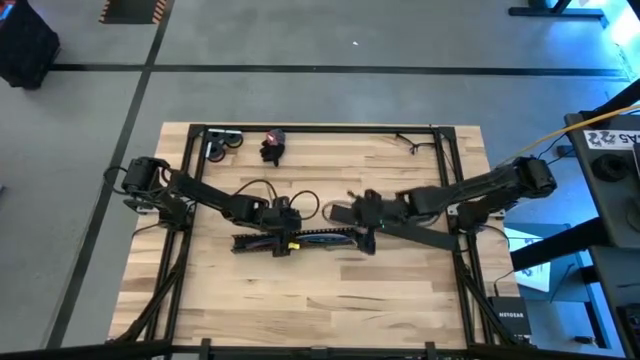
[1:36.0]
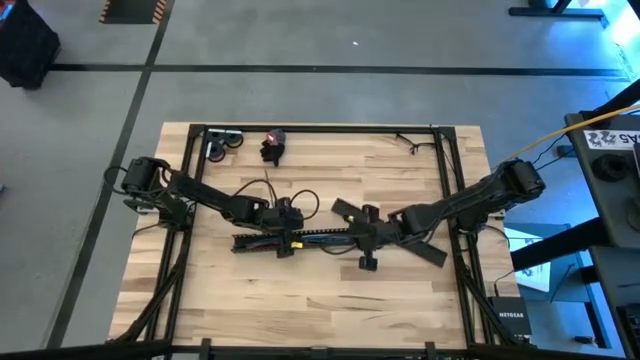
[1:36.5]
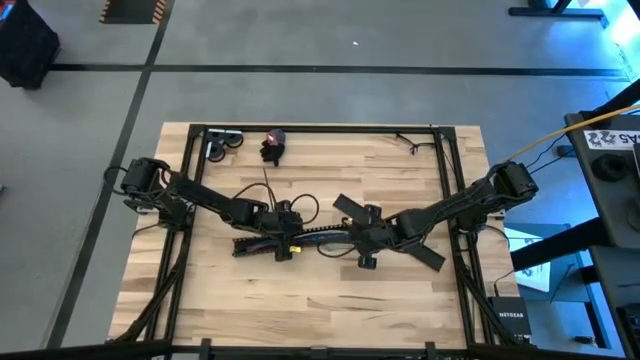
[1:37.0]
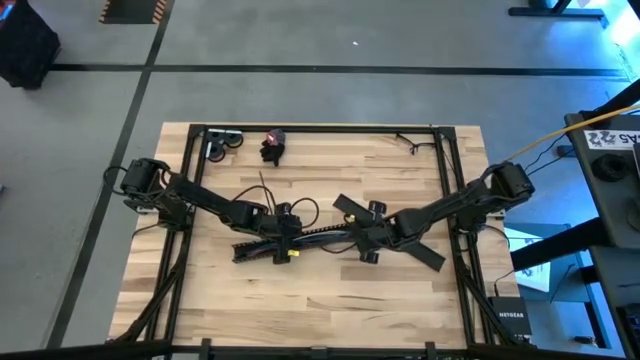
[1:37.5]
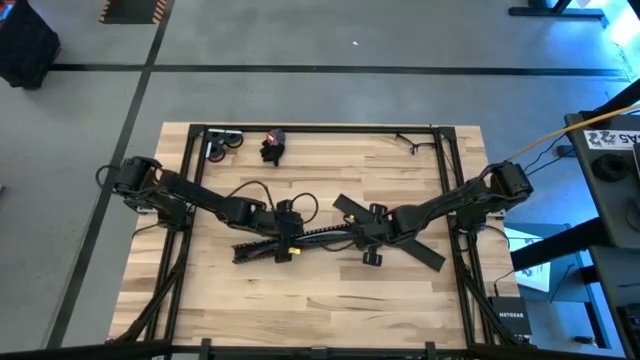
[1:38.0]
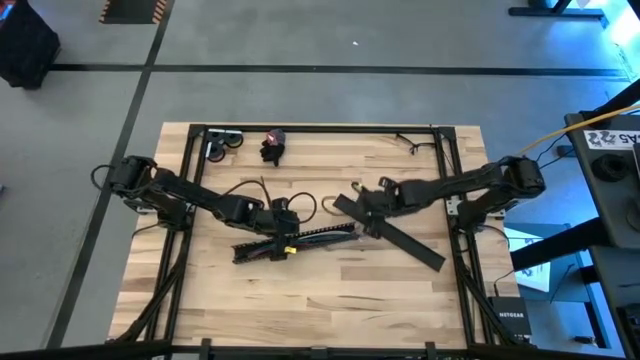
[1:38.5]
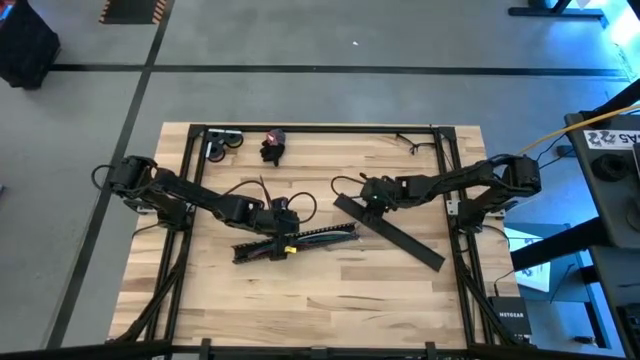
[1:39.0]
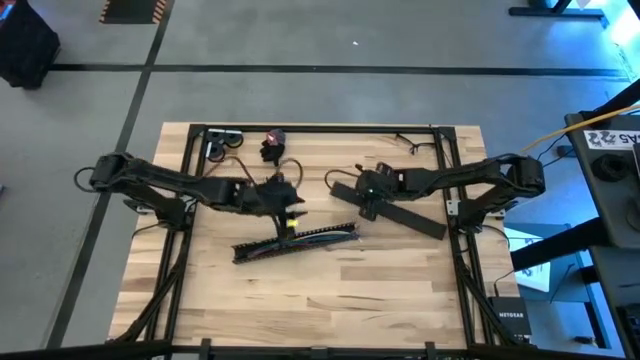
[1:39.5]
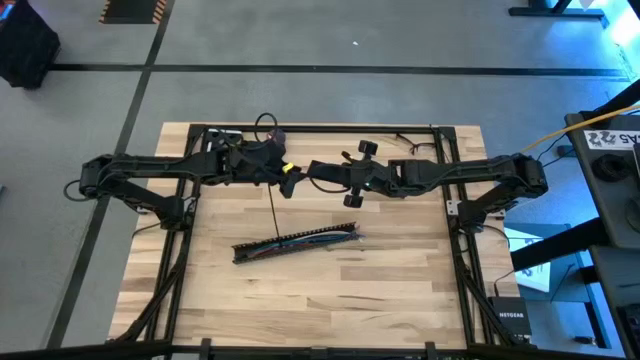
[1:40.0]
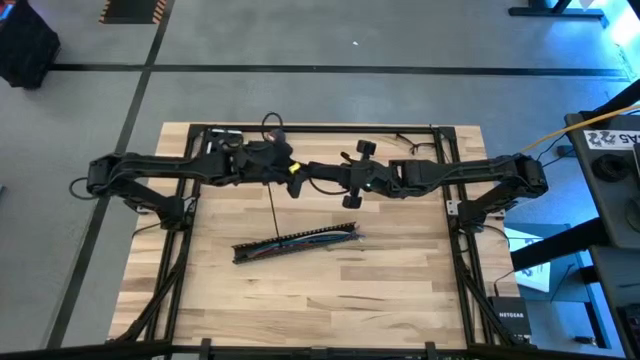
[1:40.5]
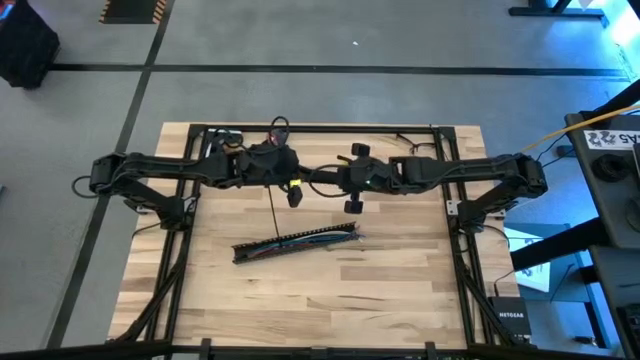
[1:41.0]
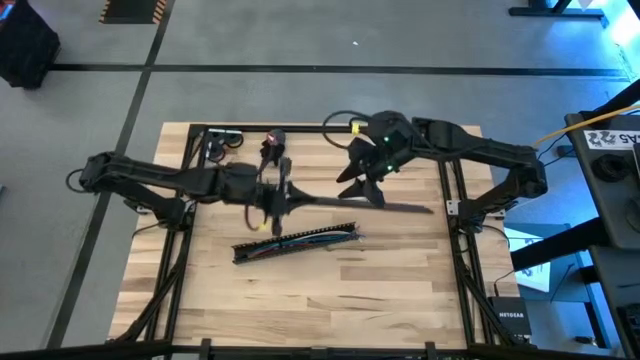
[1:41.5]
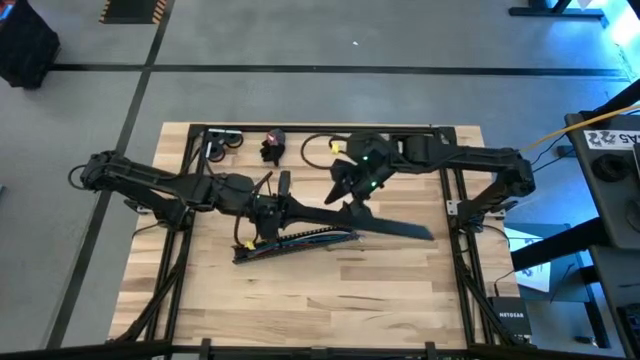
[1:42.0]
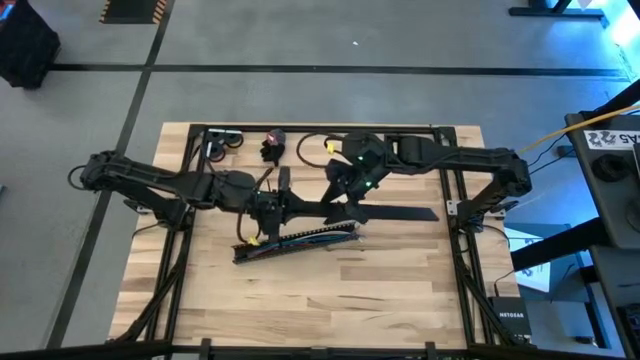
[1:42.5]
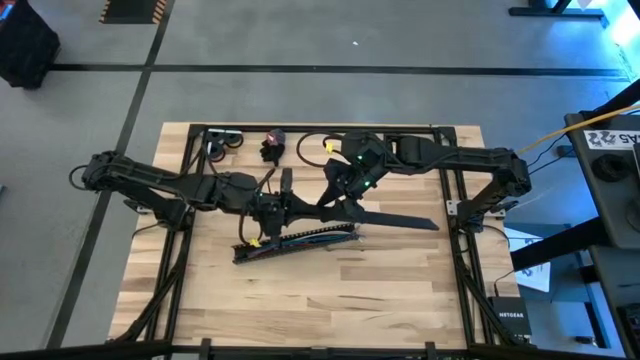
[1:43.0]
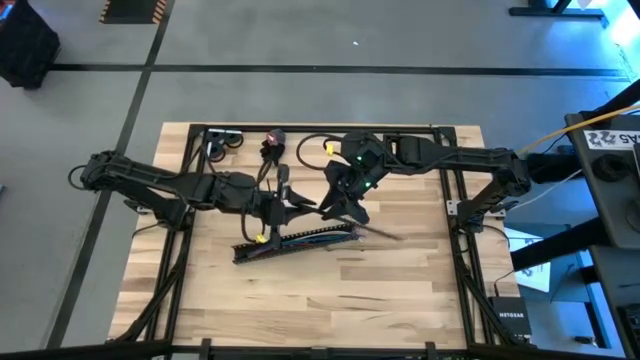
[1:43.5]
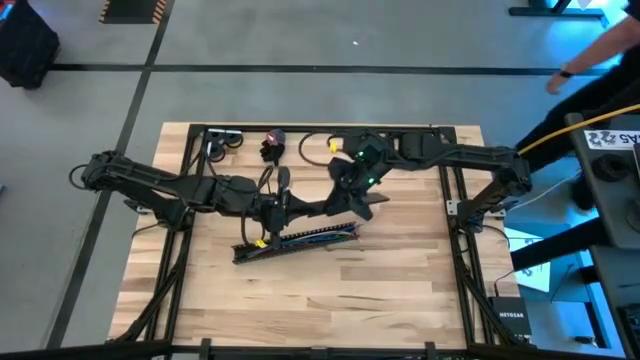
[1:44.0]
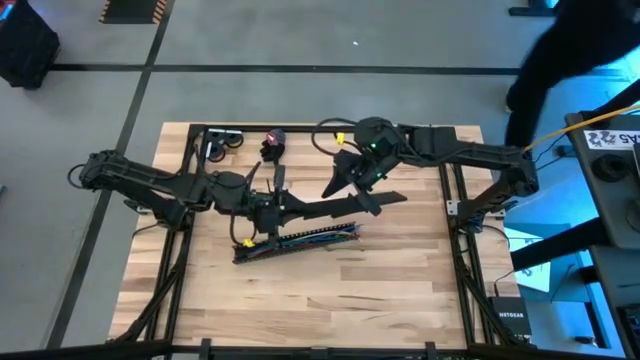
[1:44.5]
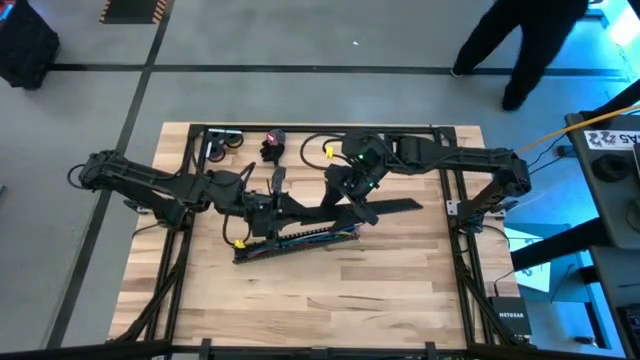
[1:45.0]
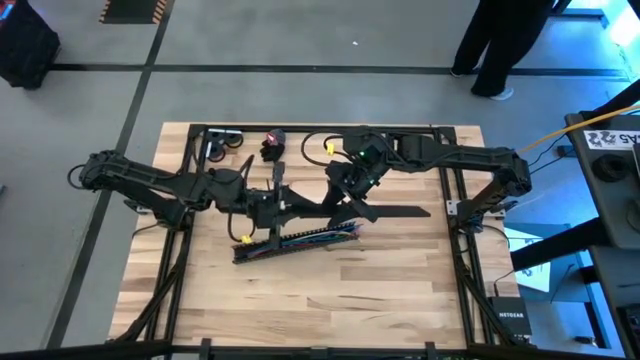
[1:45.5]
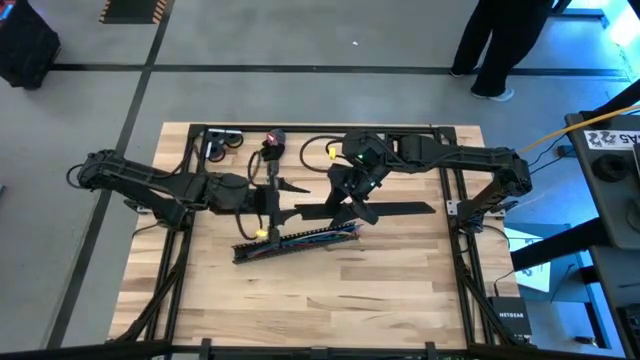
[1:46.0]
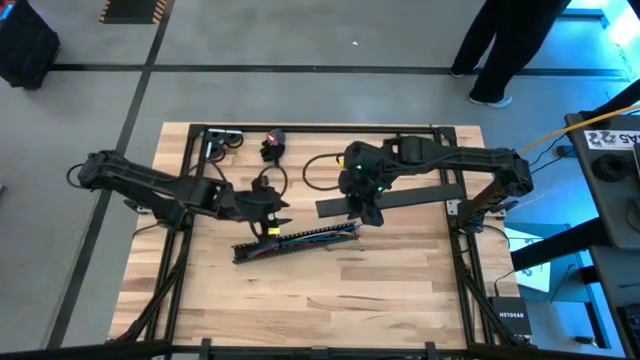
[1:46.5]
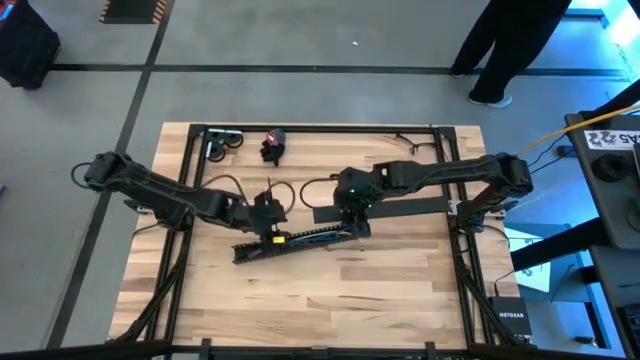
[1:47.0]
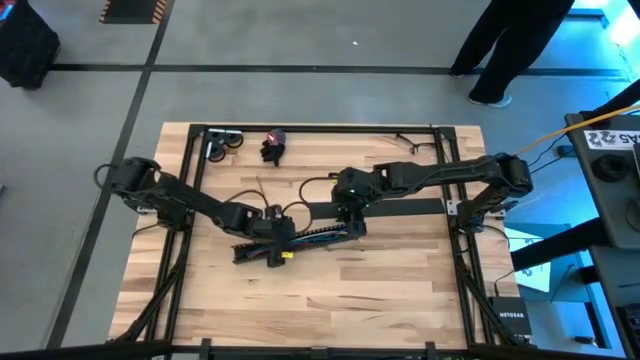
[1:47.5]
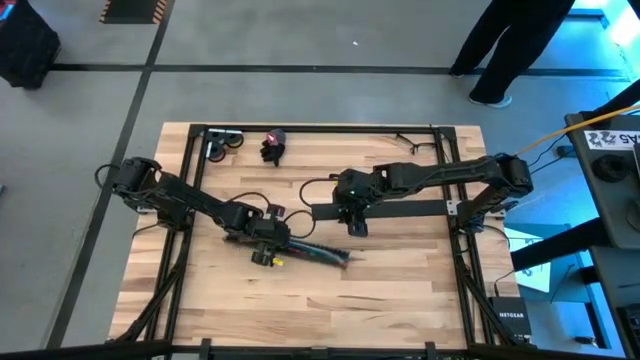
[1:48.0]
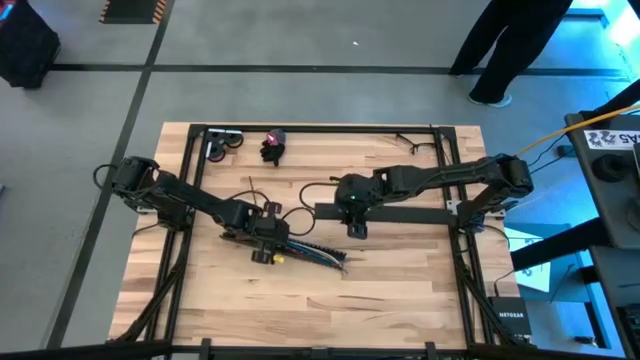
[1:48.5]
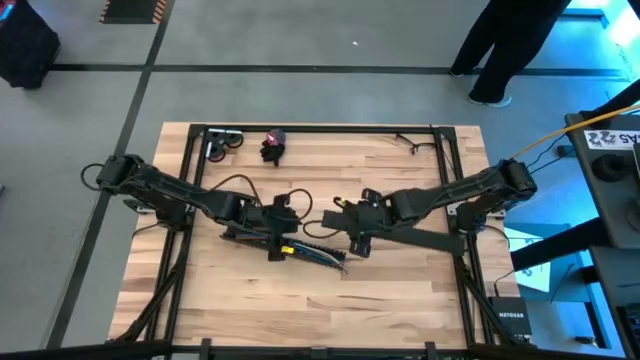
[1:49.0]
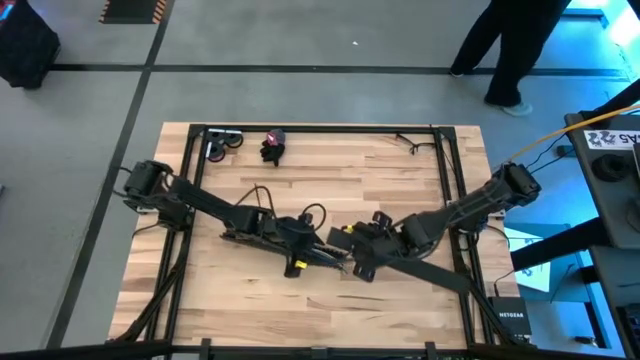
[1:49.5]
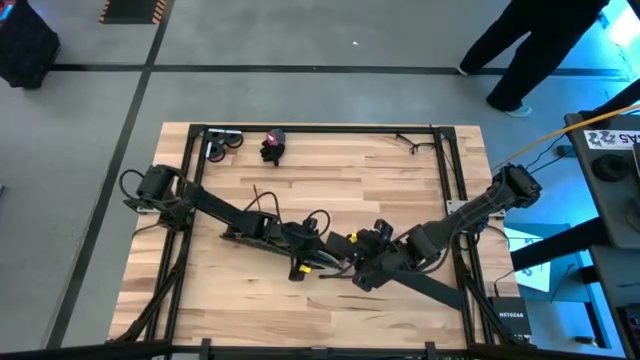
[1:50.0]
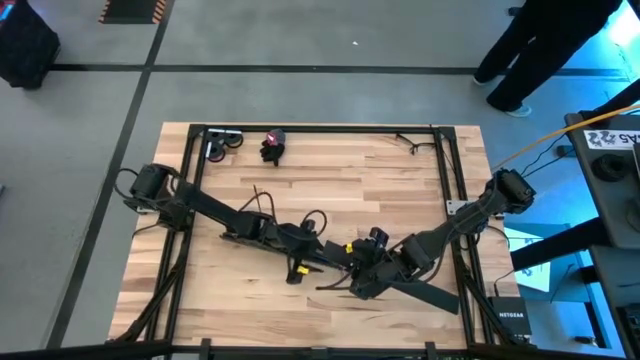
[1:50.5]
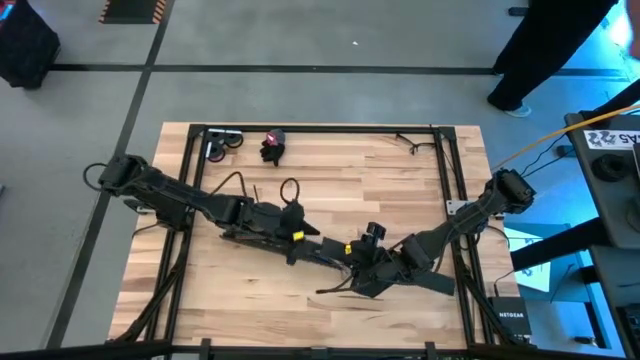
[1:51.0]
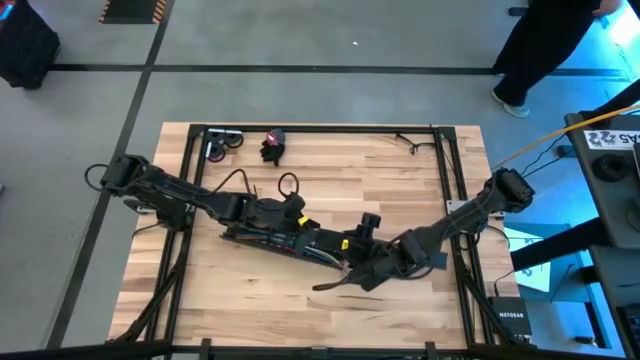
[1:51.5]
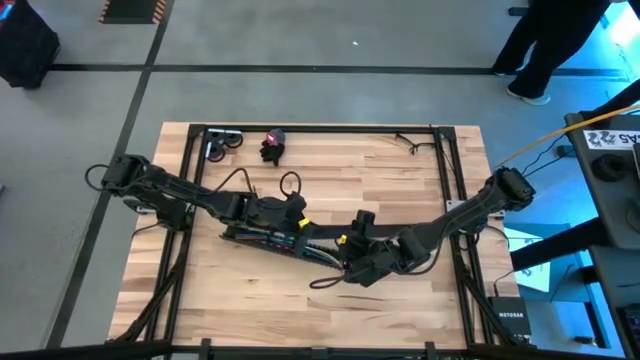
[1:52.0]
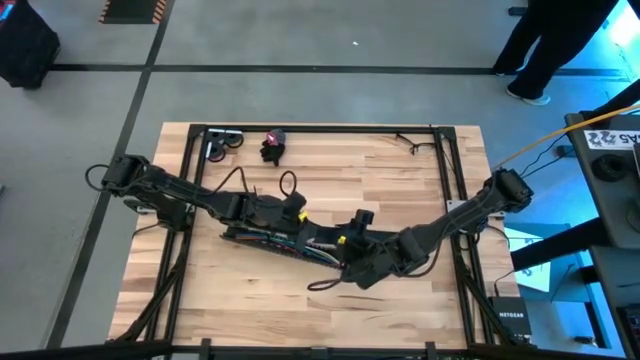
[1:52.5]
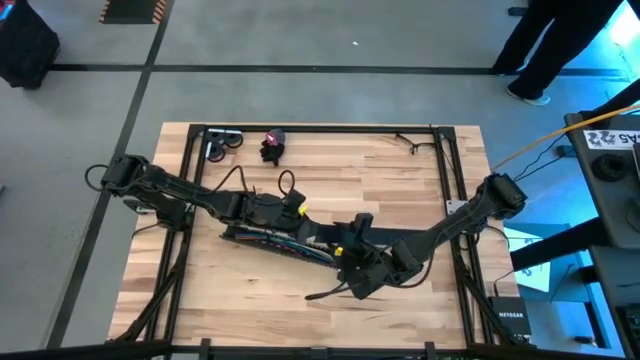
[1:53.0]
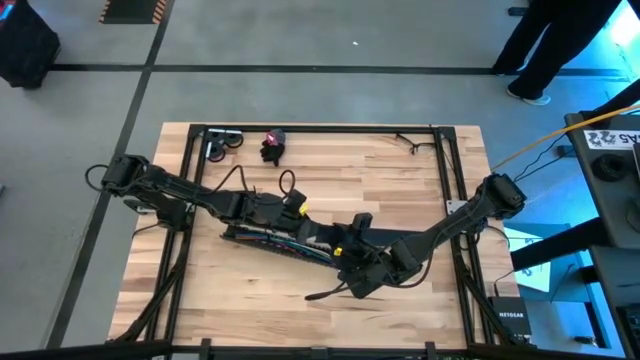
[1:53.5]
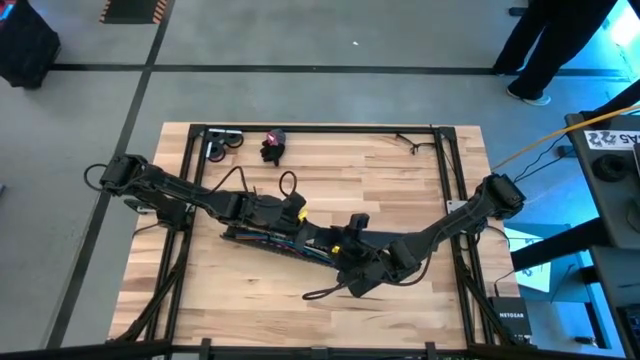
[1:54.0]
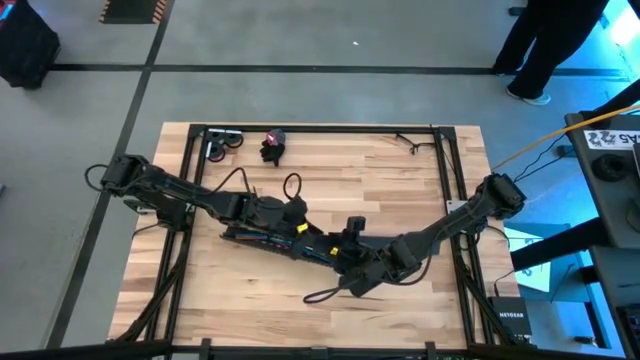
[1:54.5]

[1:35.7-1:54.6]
Task: Ziptie cables
Close the black cable duct

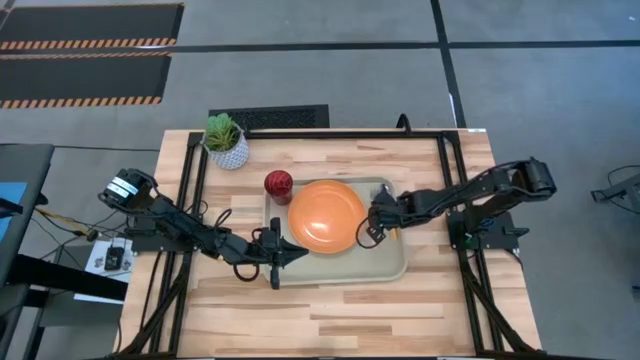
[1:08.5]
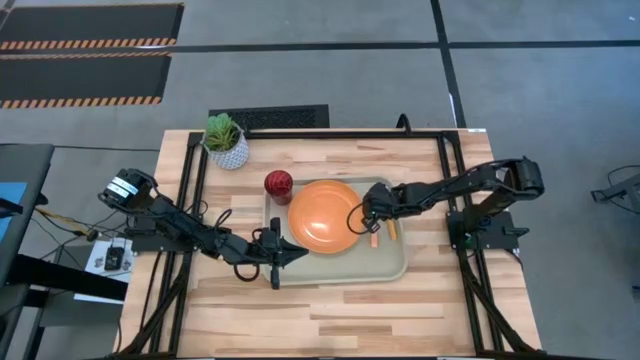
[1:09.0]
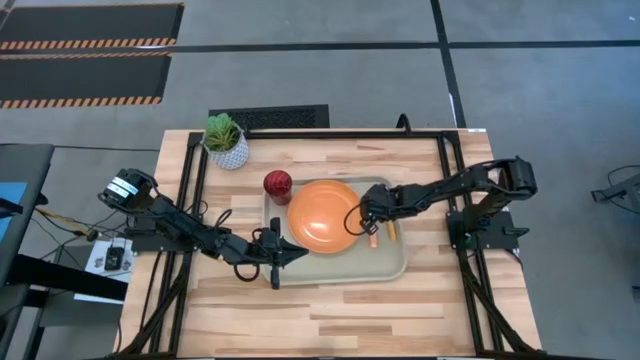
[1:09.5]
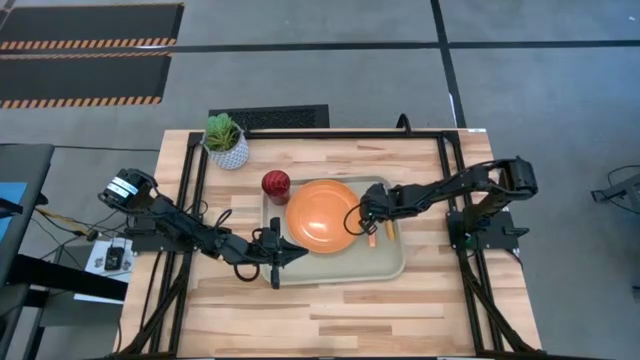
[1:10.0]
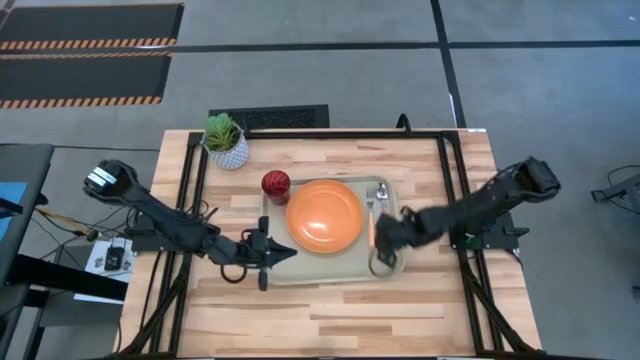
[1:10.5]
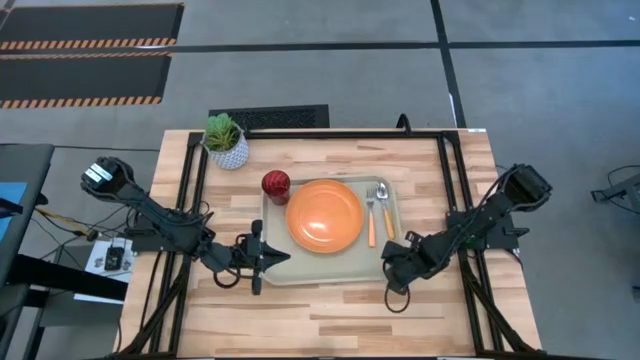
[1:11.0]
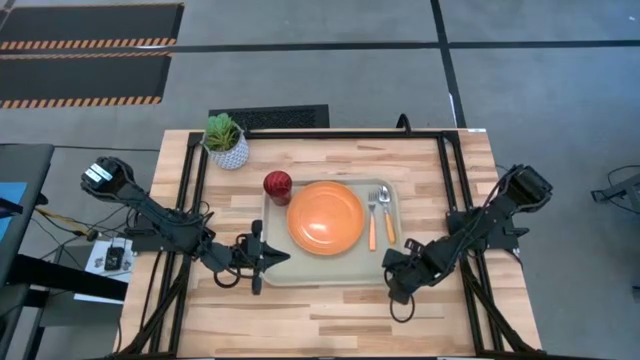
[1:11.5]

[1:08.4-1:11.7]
Task: Pick and place plate/cup/fork/spoon on tray
Adjust the gray serving tray
